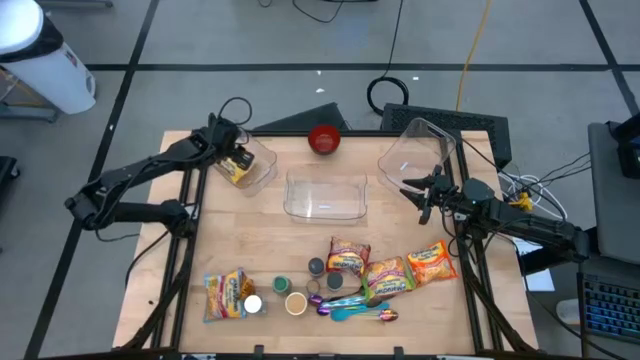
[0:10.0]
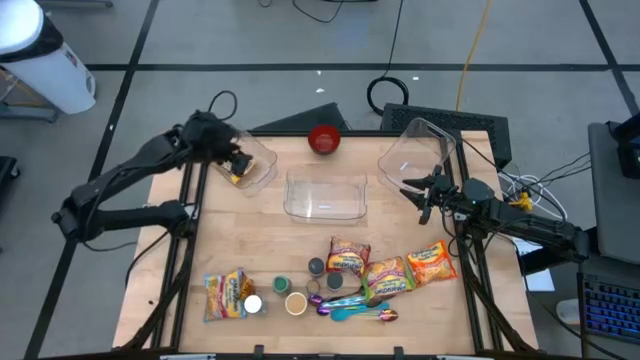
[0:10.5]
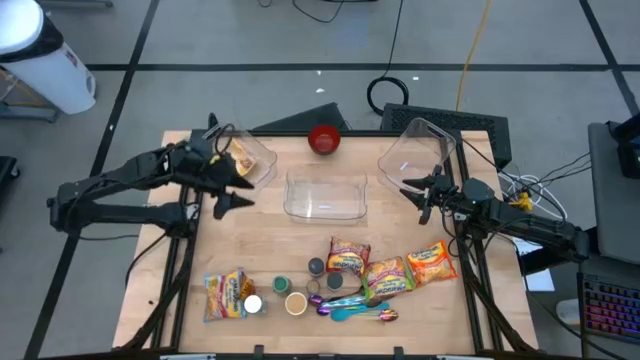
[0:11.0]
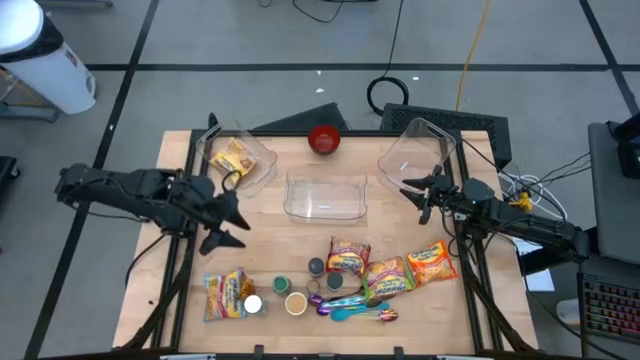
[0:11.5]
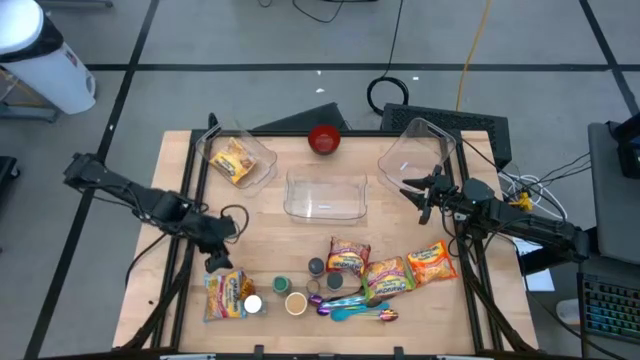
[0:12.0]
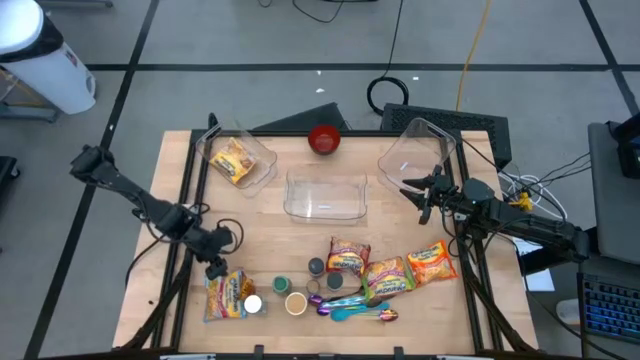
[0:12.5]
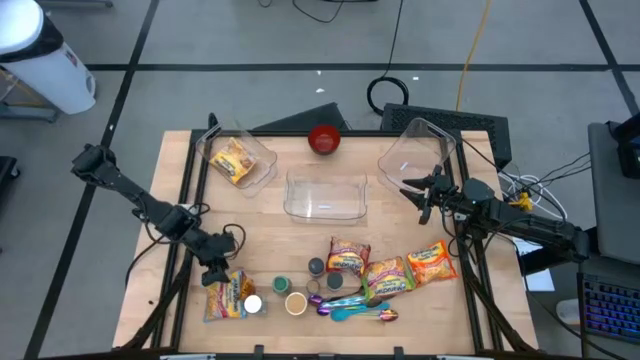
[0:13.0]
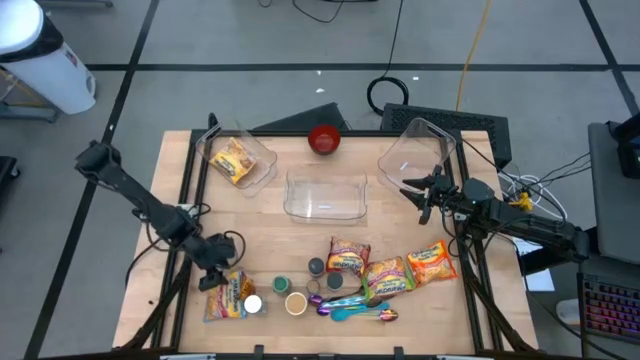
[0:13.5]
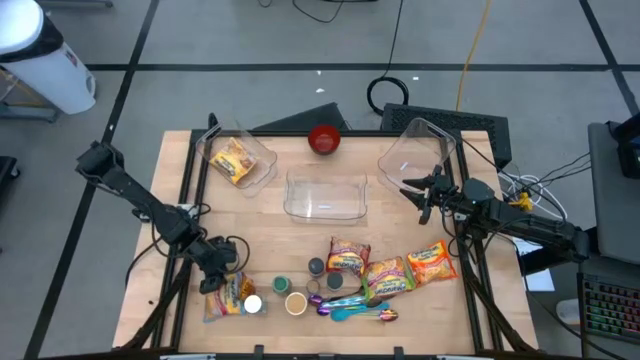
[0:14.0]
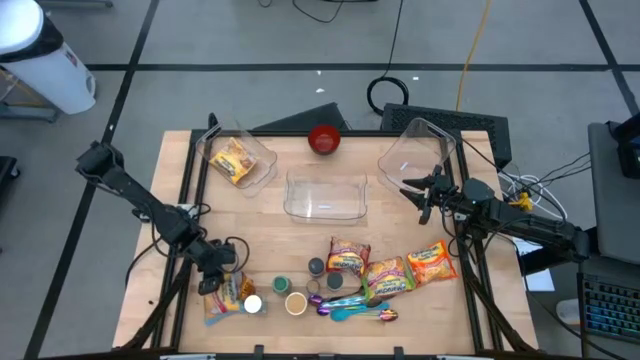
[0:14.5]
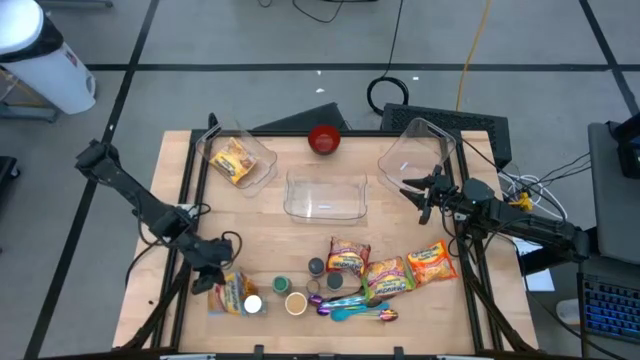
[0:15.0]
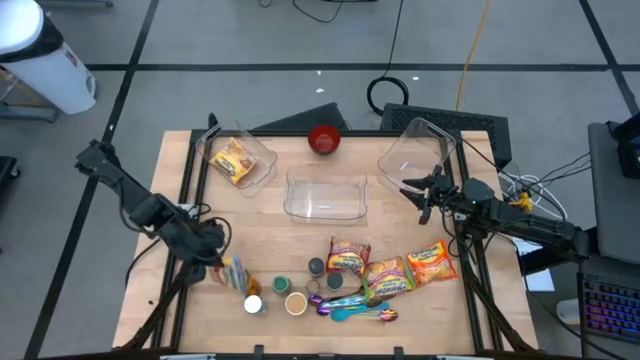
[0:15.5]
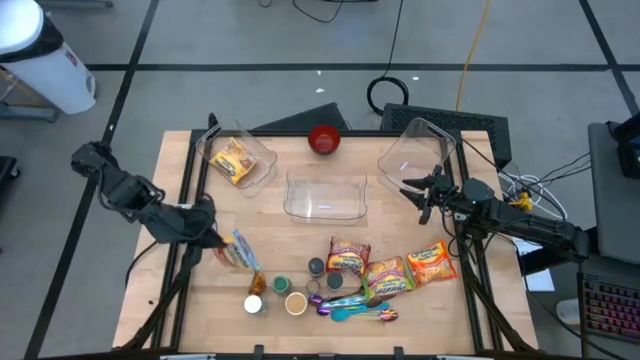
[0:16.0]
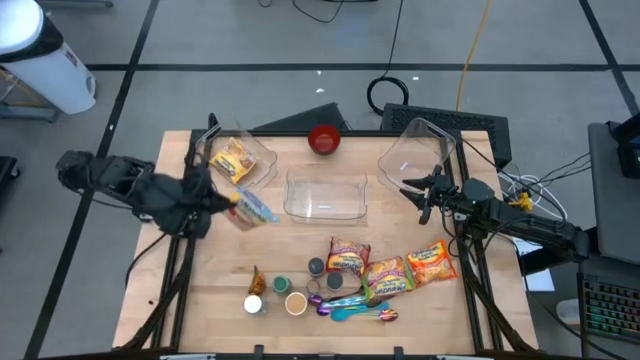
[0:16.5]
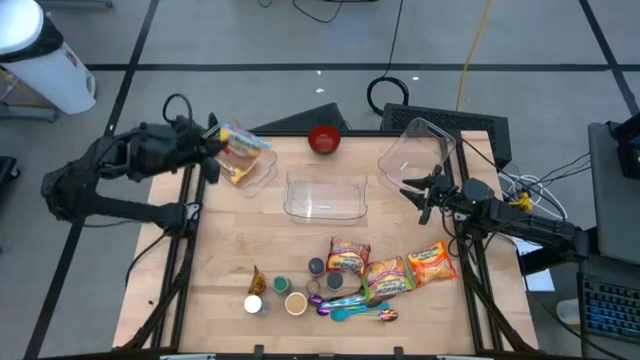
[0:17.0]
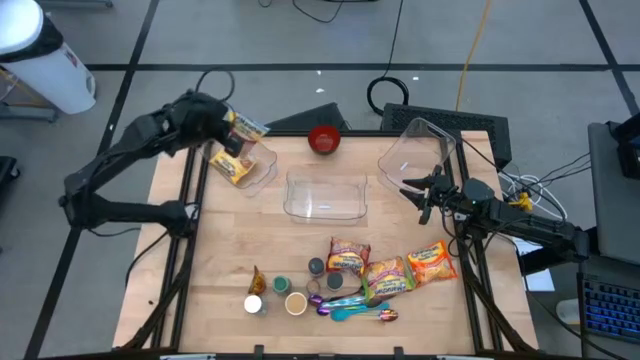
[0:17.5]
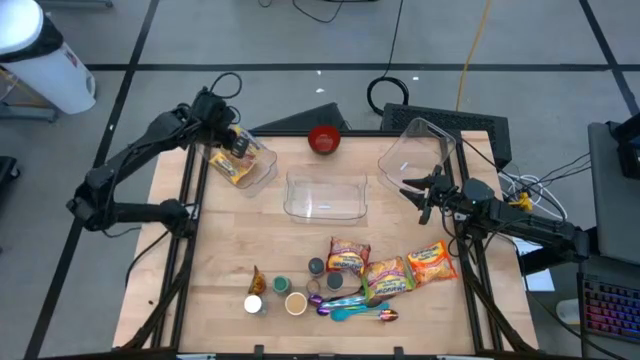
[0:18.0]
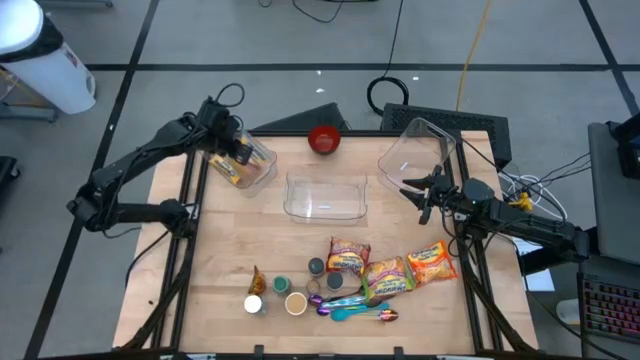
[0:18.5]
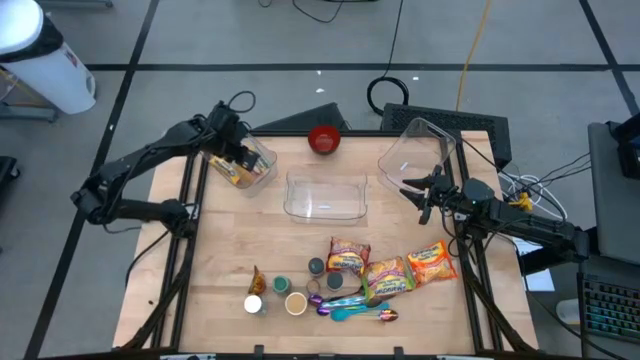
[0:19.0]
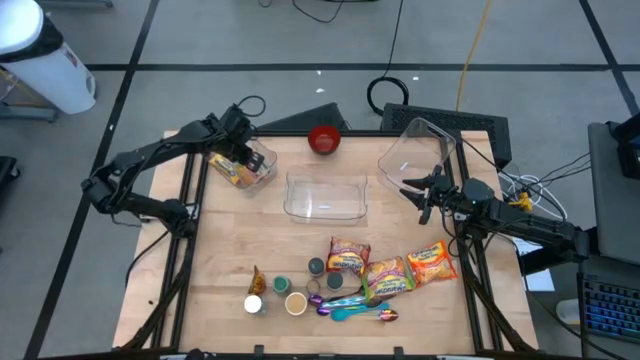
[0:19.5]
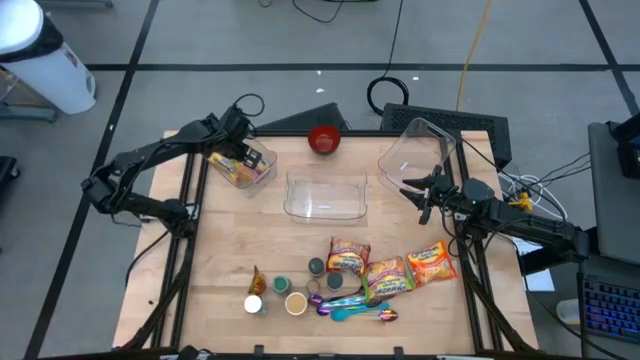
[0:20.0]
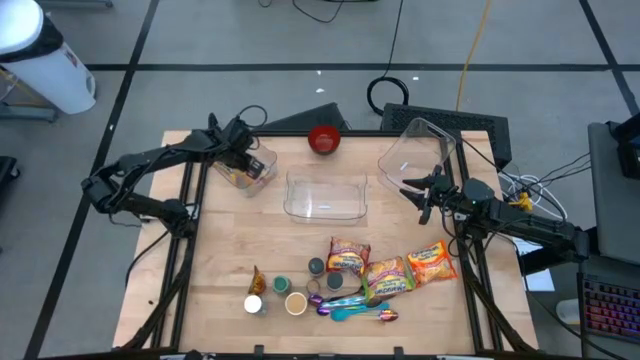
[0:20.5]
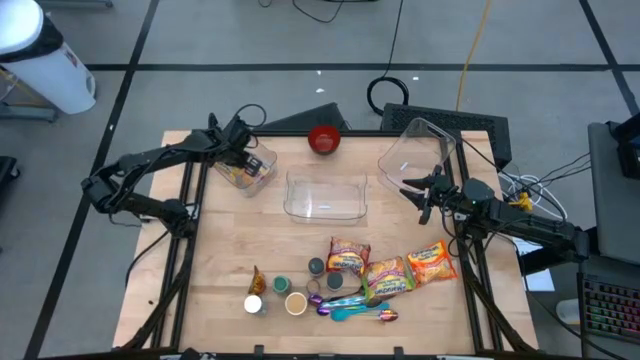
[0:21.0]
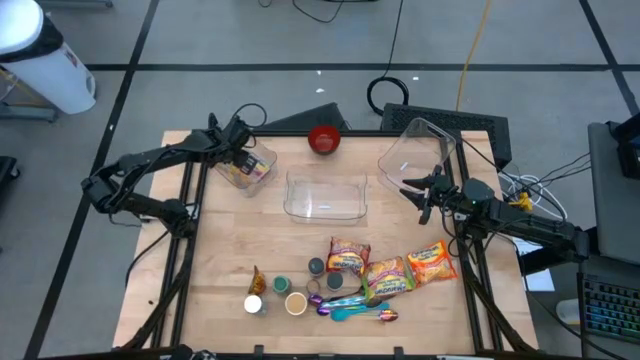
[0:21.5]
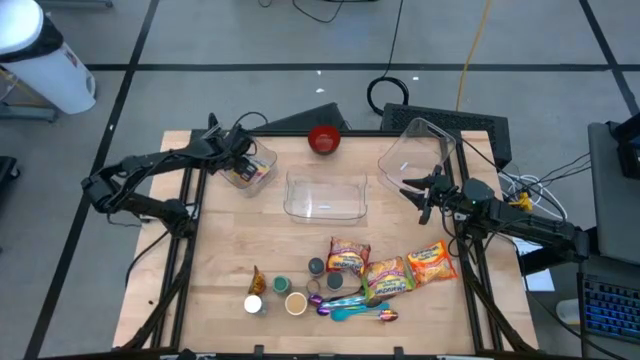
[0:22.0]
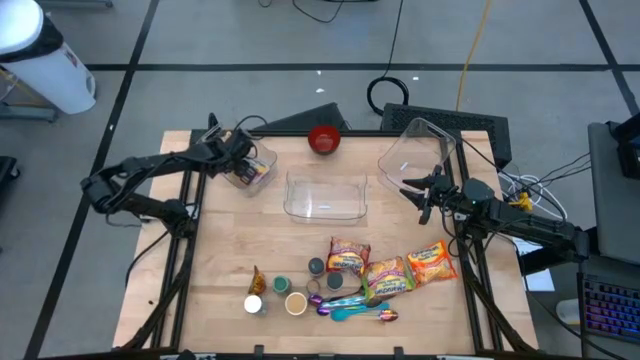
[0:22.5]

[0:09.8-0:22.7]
Task: Pick & Place Food Item
Put the blue noodle pack into the left transparent bin

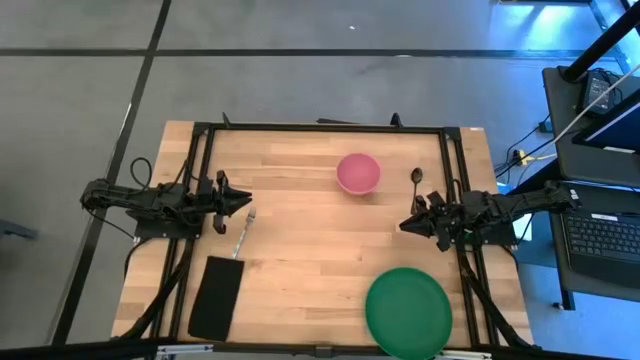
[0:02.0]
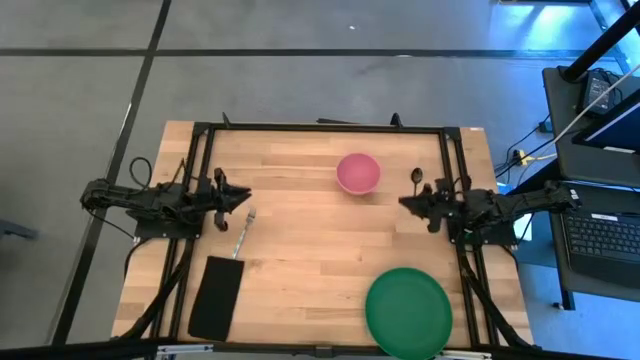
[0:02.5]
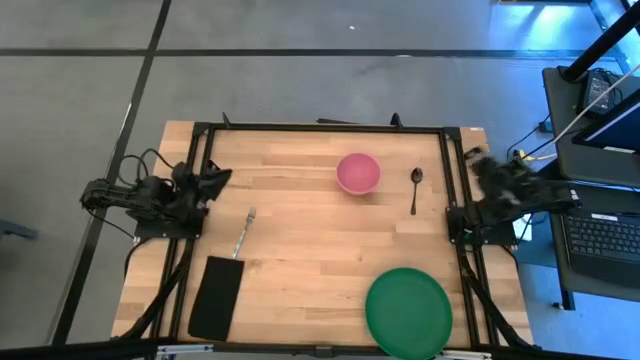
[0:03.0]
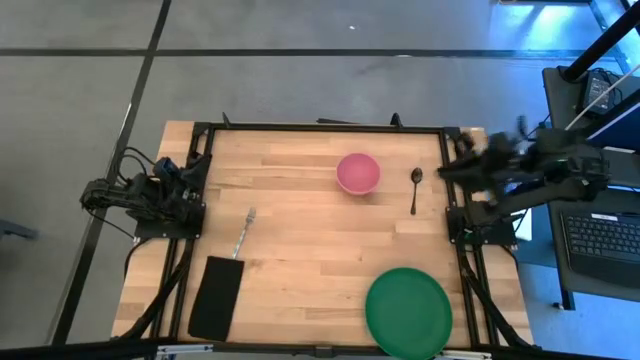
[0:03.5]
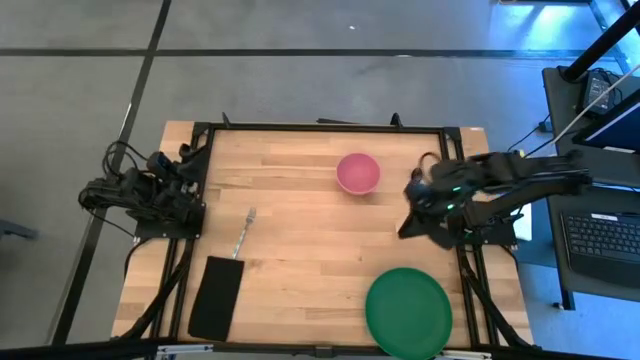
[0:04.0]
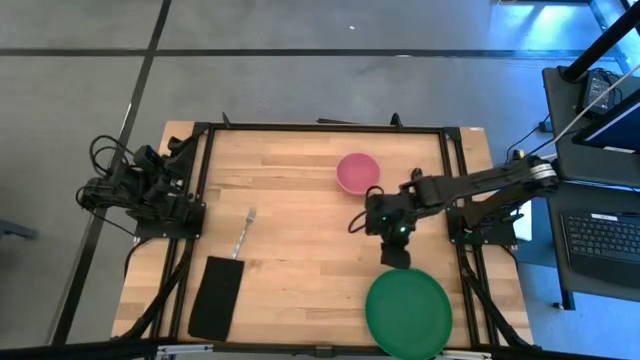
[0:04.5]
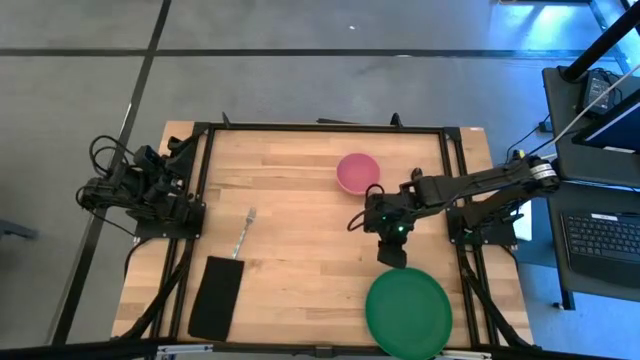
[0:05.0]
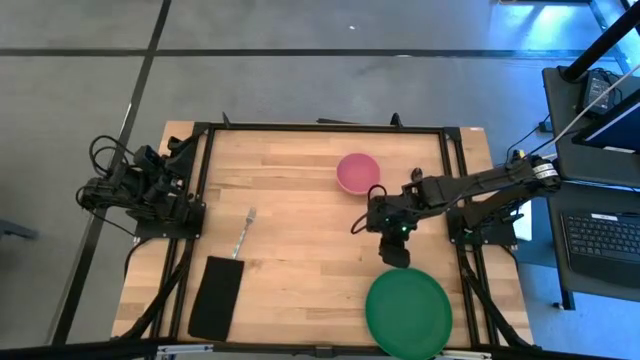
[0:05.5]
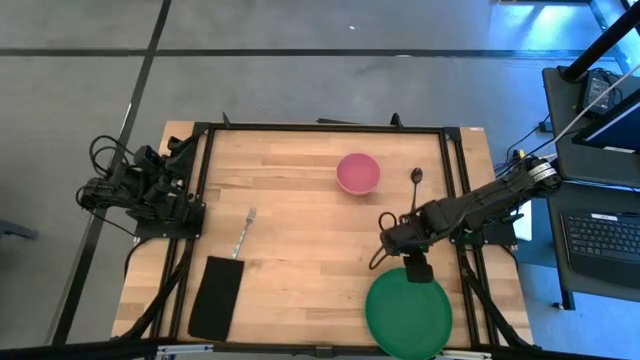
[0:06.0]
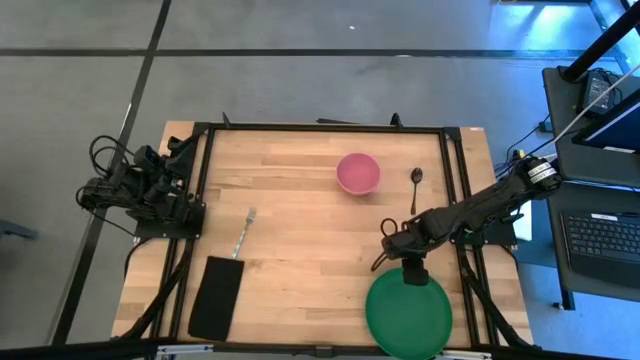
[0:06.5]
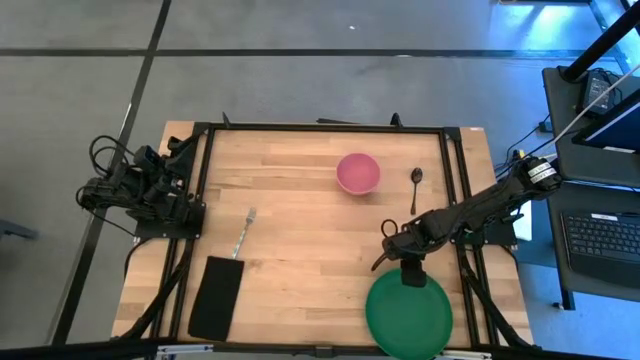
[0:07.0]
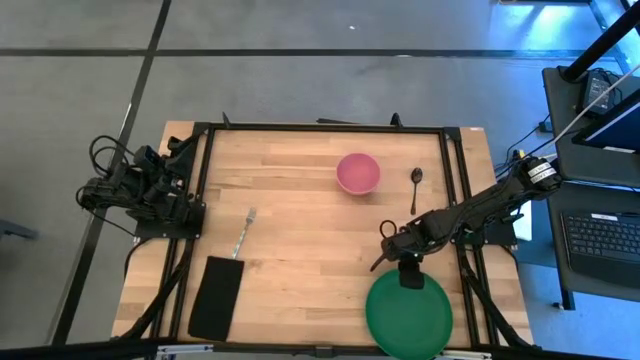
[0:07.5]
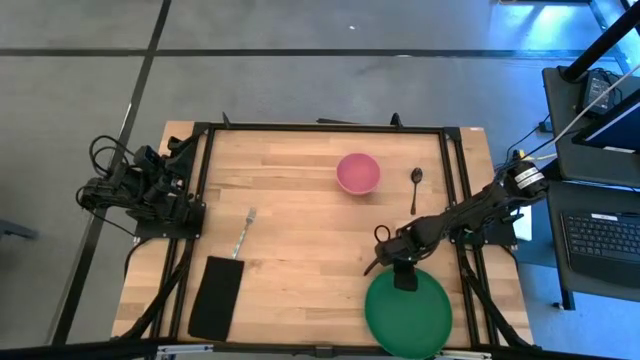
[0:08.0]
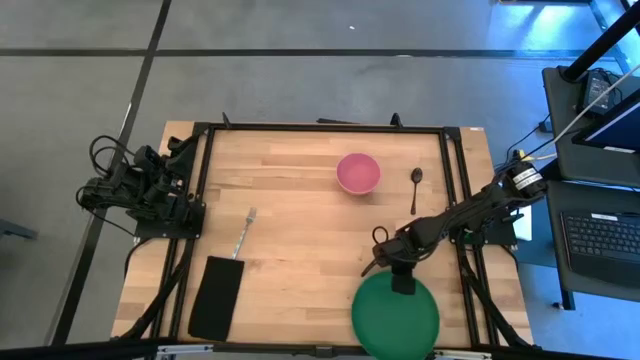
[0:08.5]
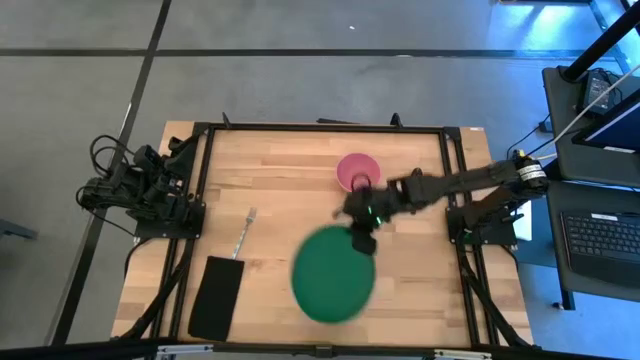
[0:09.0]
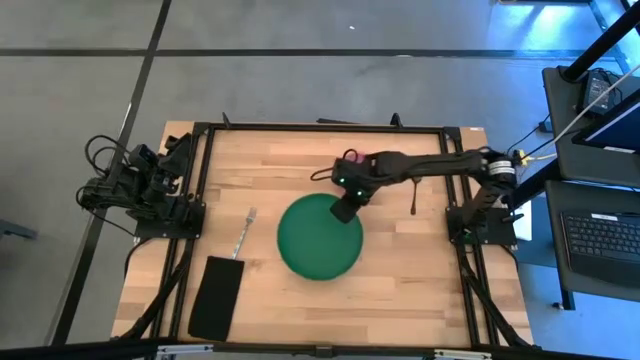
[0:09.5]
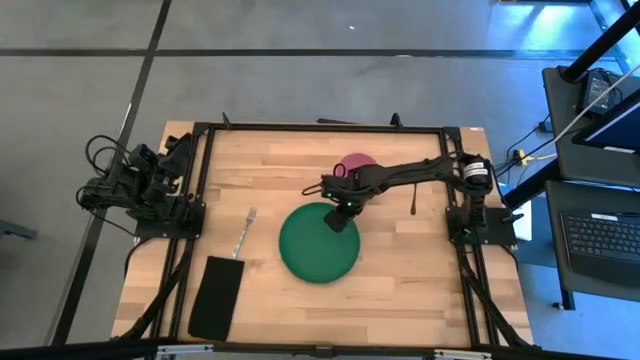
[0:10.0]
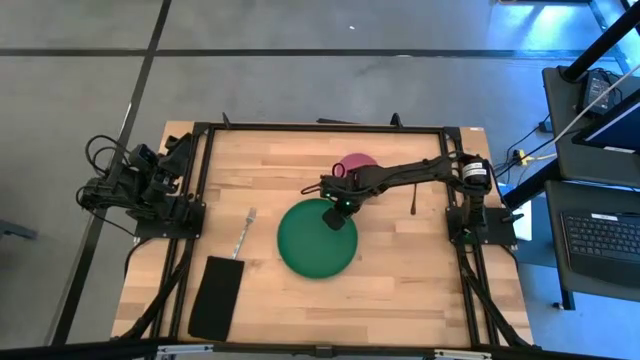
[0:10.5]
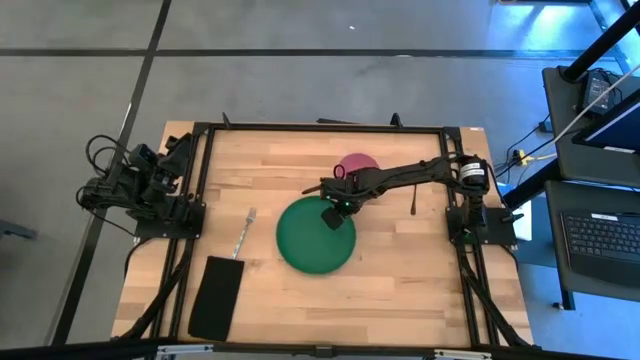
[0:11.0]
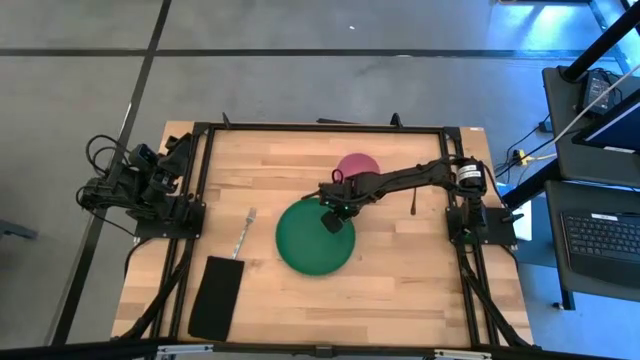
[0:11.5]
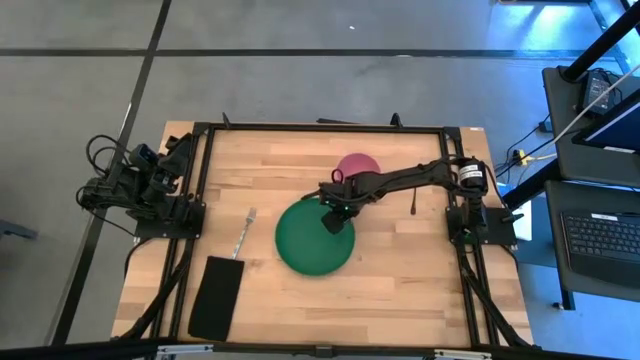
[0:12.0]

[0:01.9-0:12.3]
Task: Set table place
Move the green plate to the middle of the table
